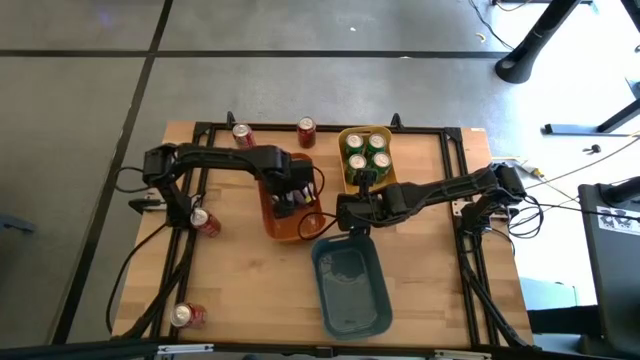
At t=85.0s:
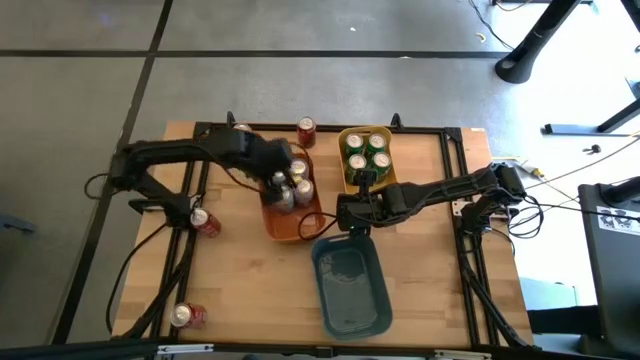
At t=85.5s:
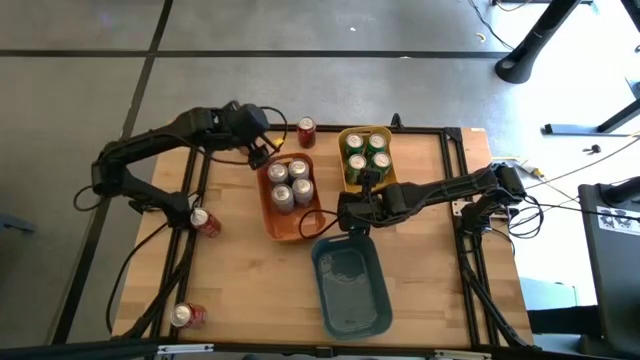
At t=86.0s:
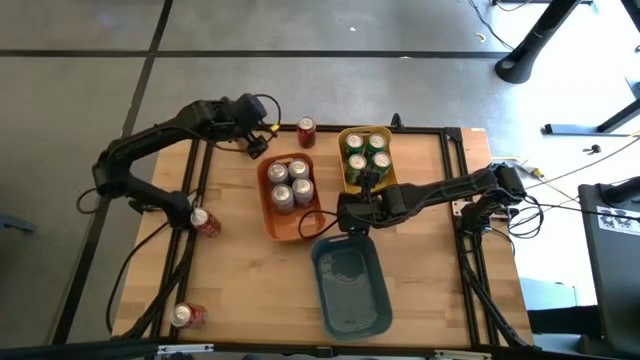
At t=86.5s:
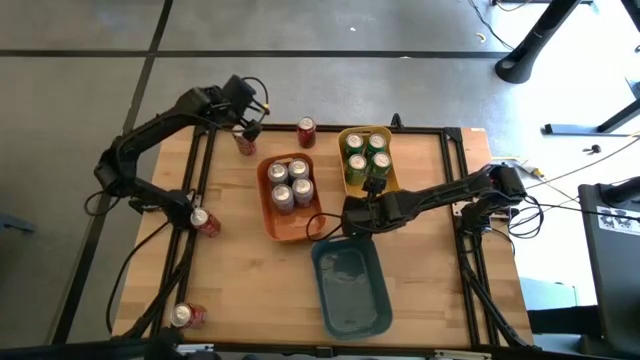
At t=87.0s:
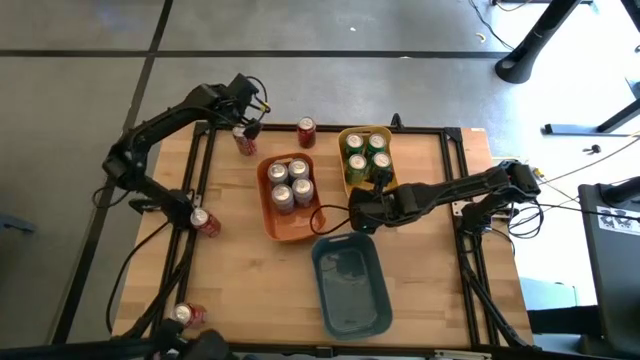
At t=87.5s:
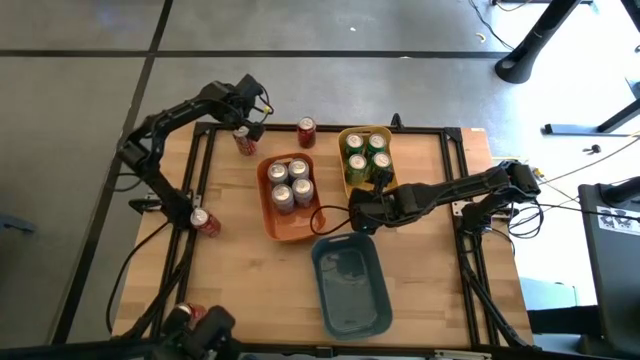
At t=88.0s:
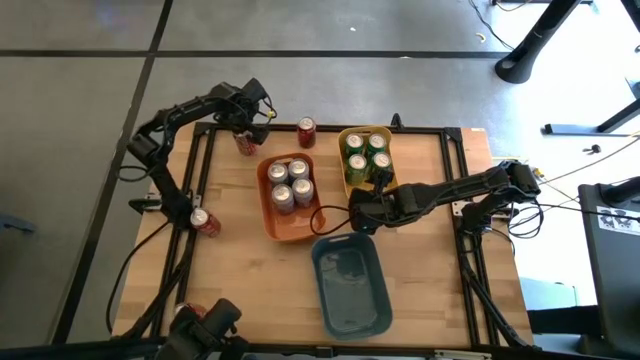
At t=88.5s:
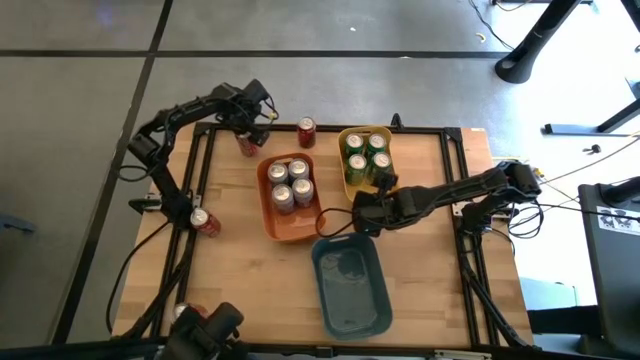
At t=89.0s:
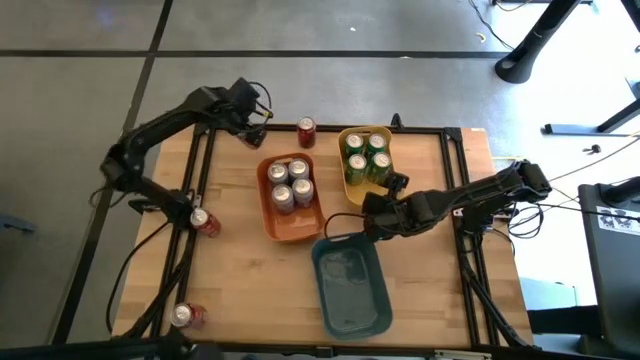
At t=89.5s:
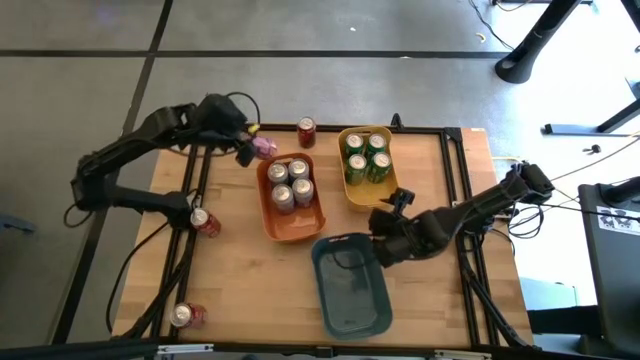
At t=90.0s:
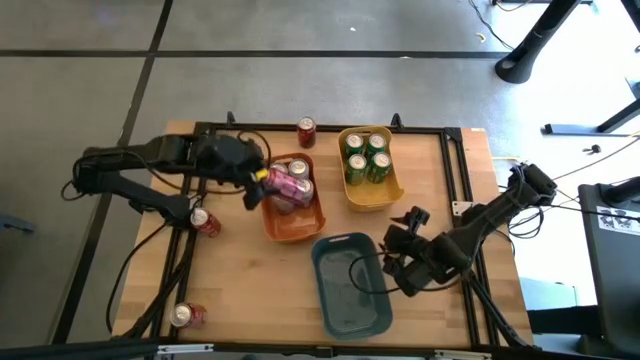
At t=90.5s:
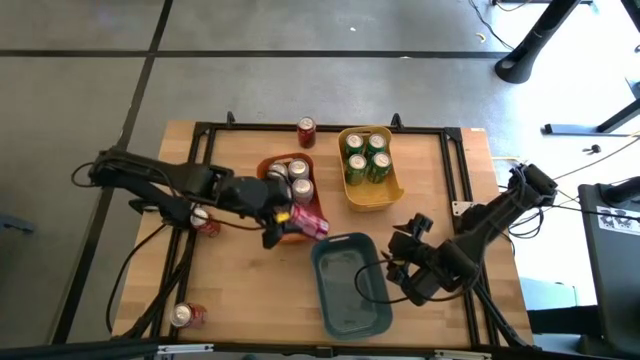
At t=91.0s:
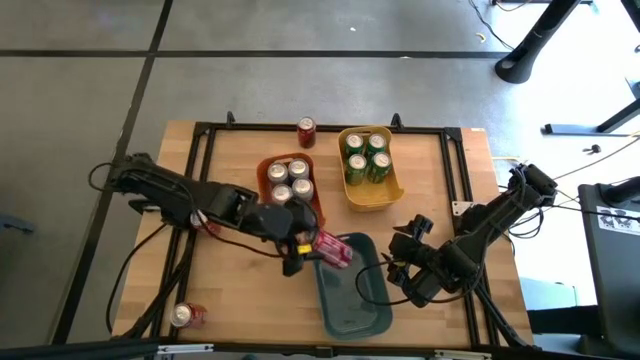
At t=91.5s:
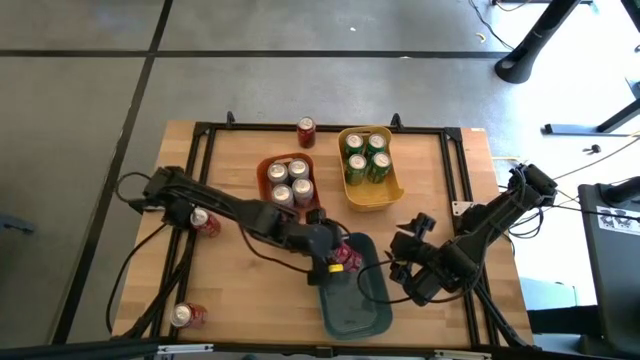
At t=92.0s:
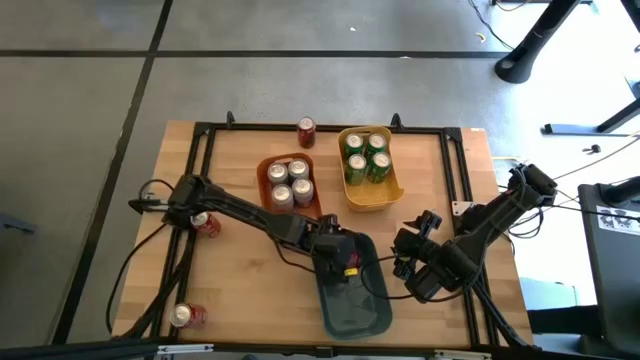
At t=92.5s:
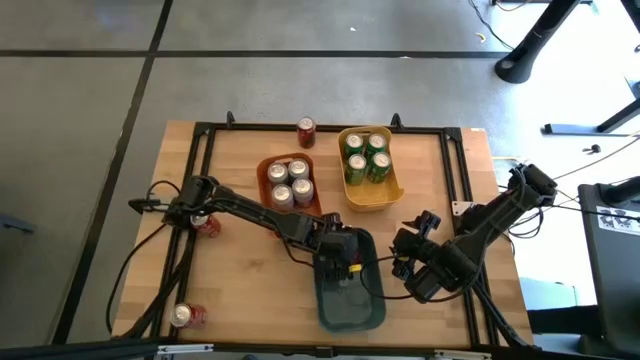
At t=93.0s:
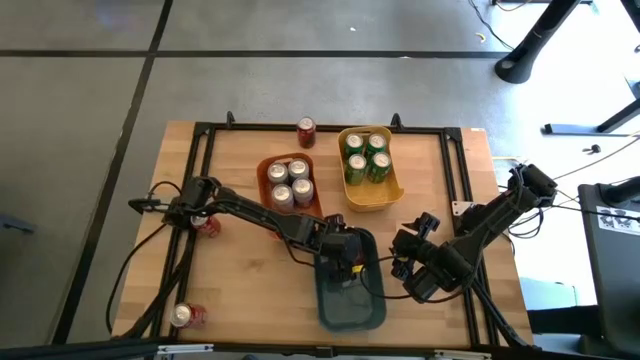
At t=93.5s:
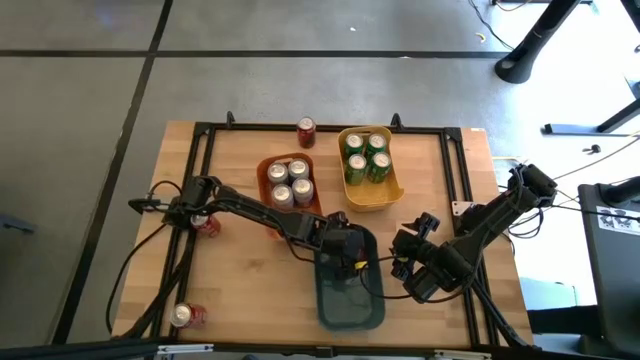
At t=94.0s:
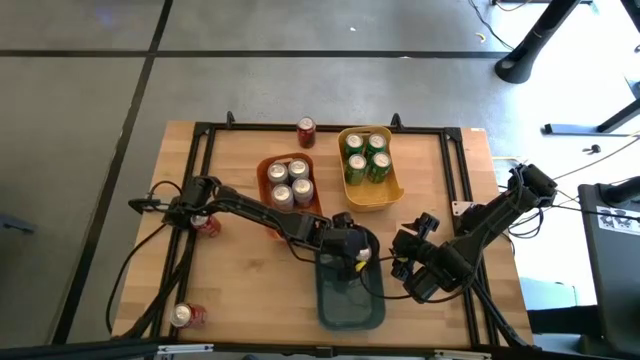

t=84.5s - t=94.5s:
Task: Sort soda cans
Put the red soda can into the blue bin

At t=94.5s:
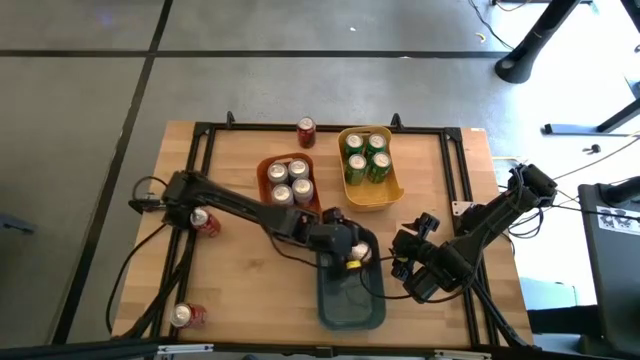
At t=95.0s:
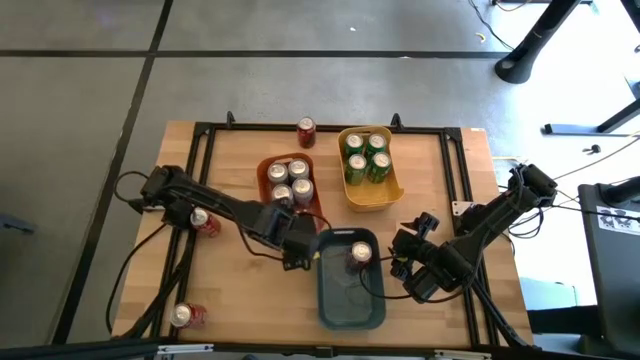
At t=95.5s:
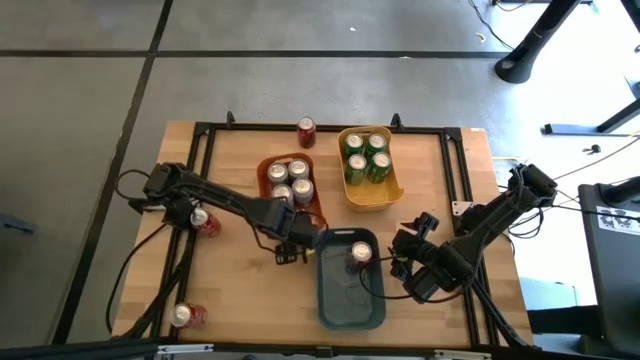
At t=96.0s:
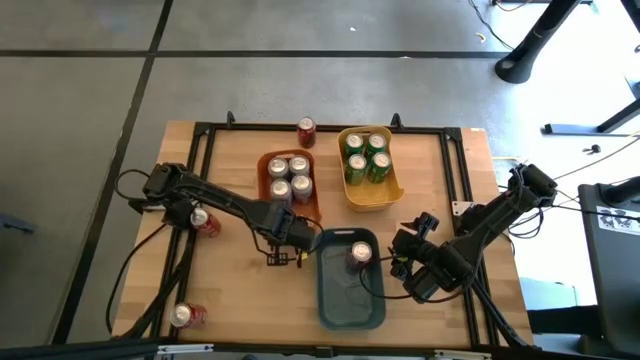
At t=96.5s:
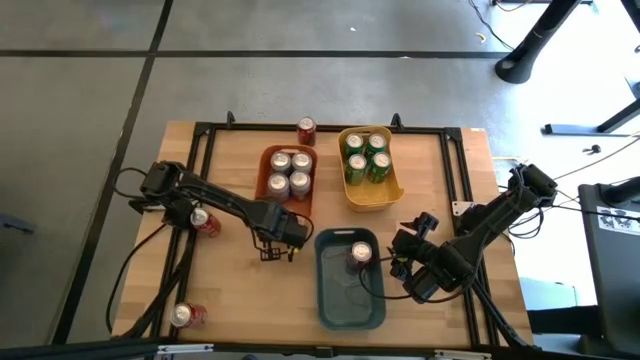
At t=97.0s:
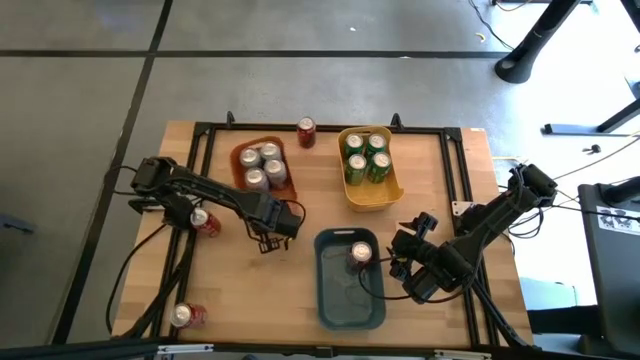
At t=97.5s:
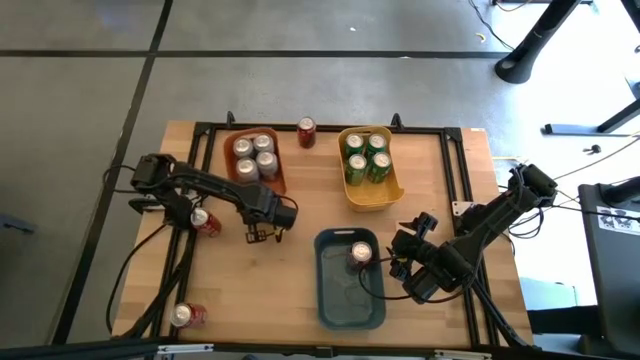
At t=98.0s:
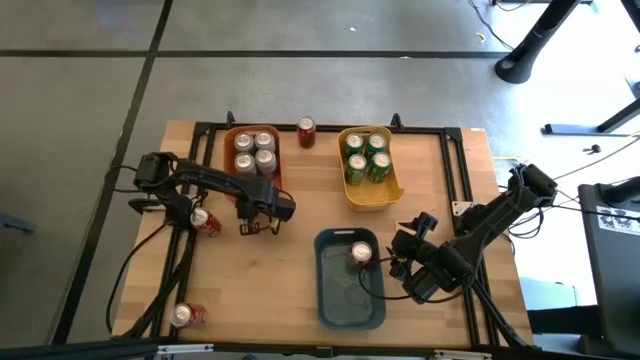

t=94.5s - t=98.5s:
Move the orange bin to the top left

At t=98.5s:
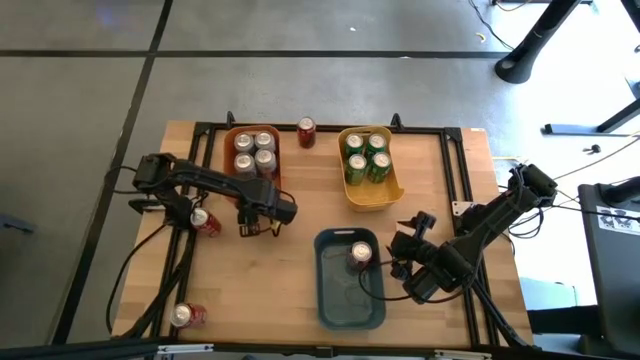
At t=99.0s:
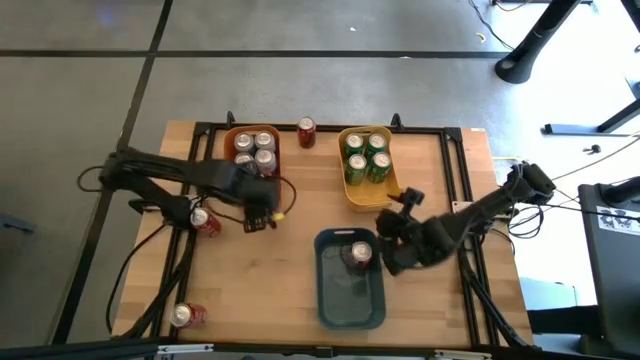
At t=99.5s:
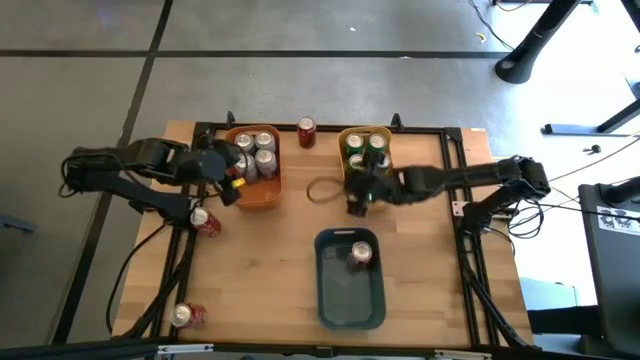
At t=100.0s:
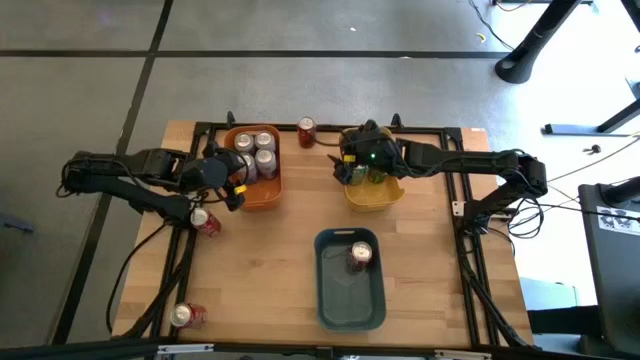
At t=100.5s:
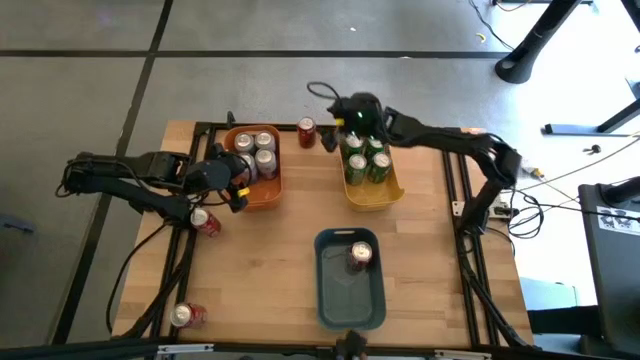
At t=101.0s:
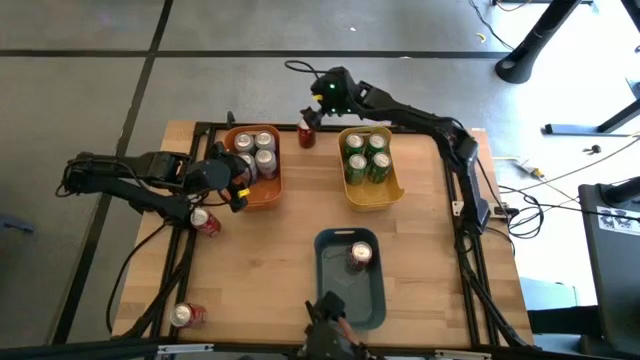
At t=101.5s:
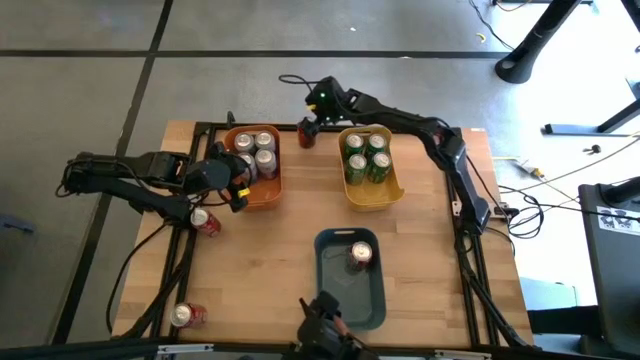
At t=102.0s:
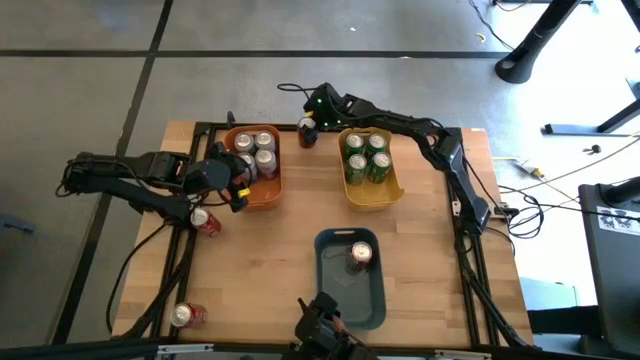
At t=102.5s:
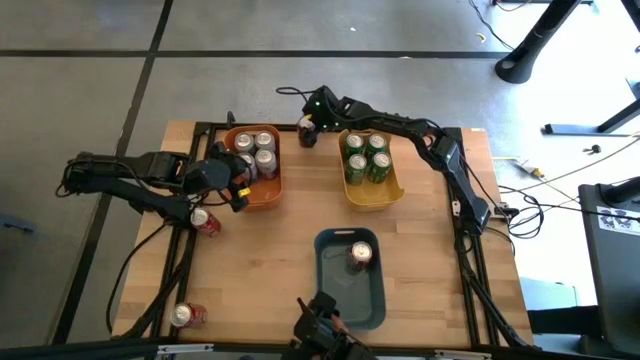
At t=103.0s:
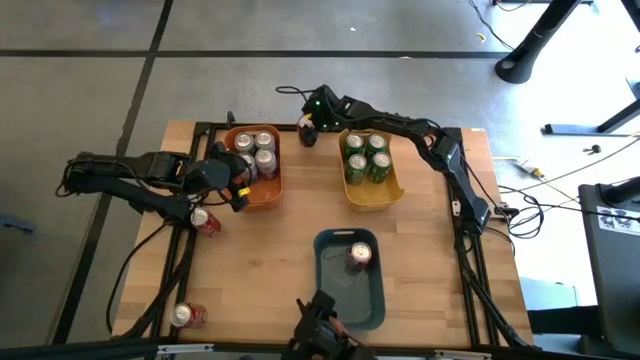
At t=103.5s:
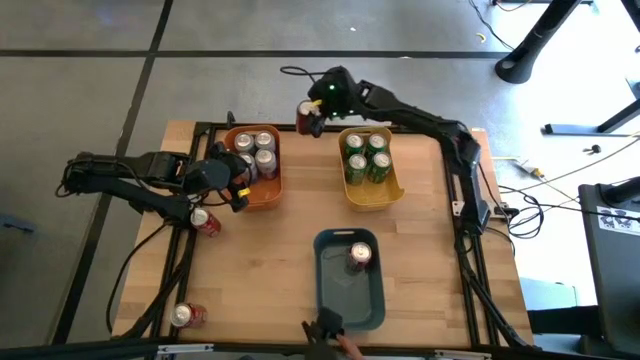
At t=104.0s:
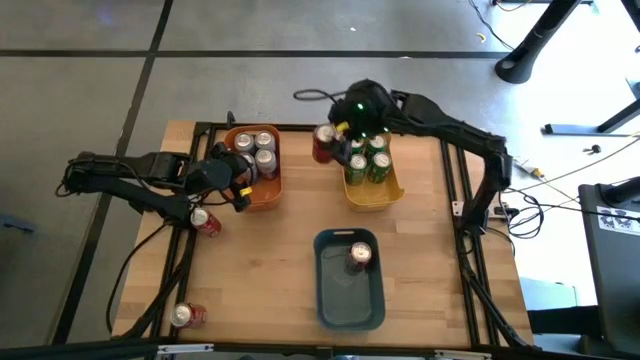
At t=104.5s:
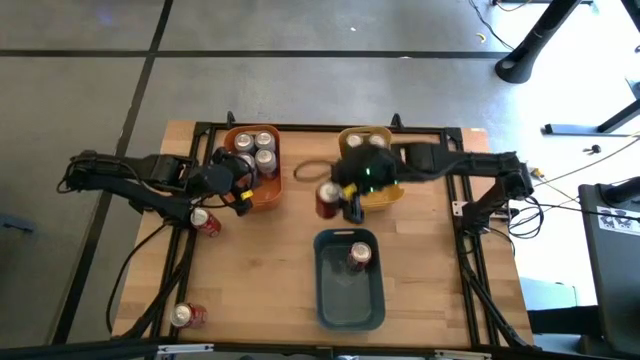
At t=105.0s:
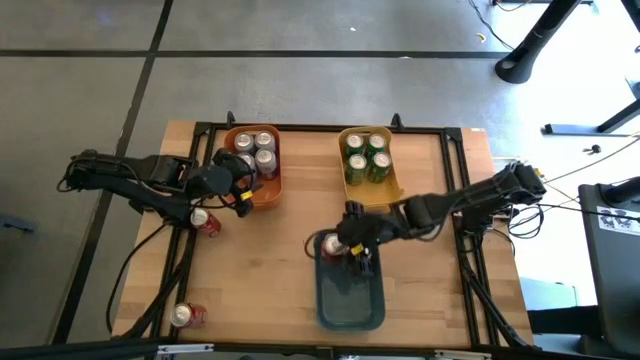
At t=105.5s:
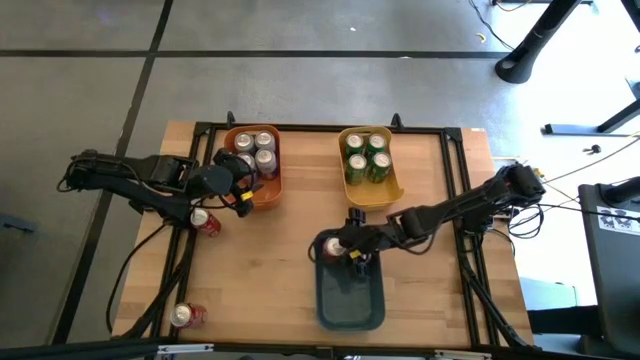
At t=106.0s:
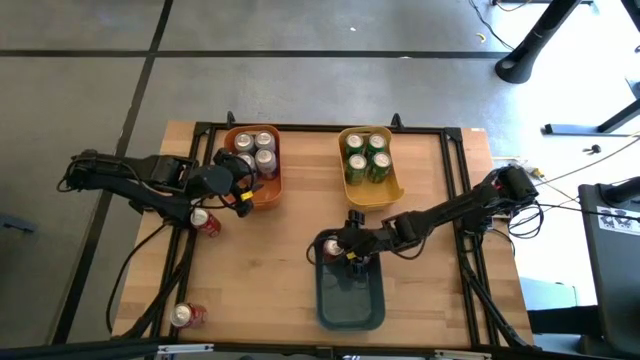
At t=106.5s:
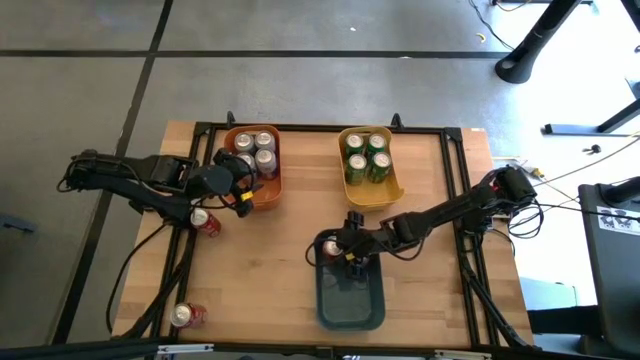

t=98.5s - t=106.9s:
Put the red soda can into the blue bin
